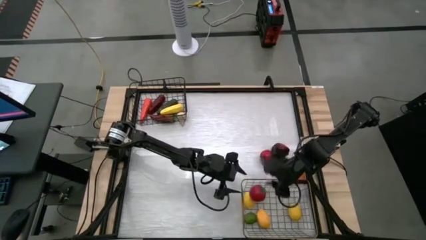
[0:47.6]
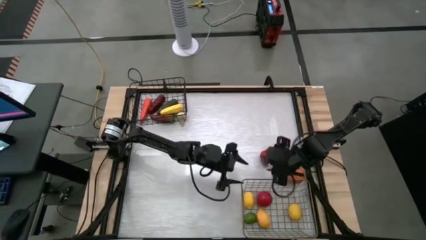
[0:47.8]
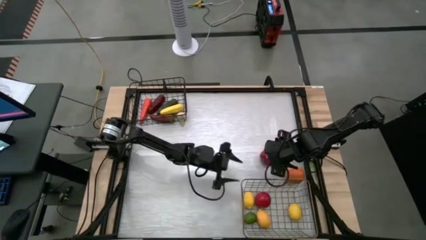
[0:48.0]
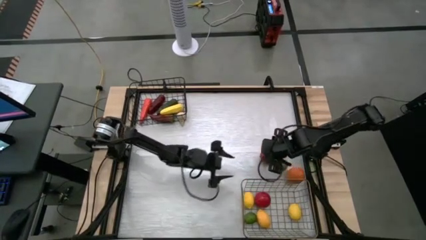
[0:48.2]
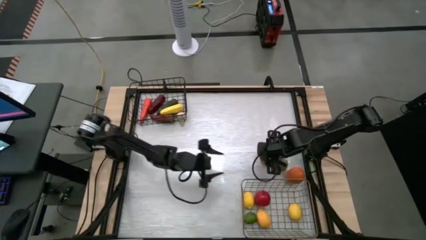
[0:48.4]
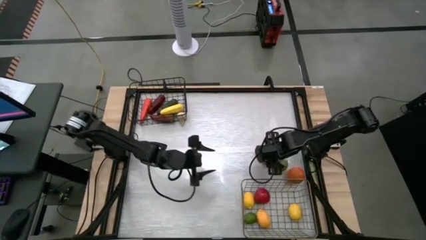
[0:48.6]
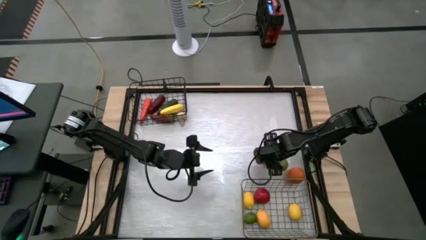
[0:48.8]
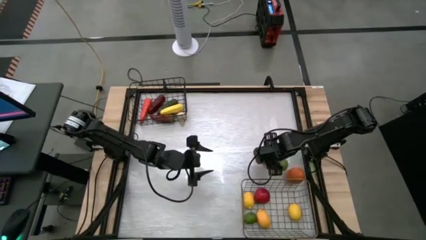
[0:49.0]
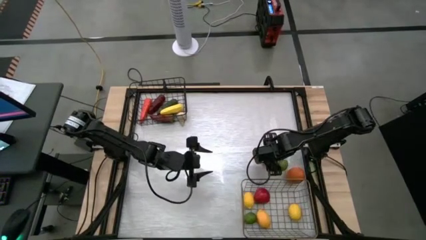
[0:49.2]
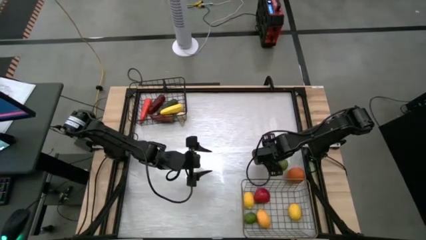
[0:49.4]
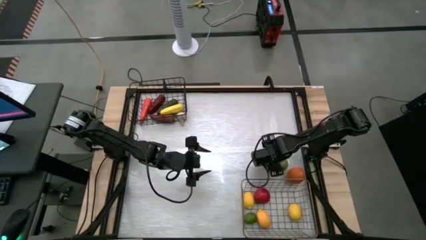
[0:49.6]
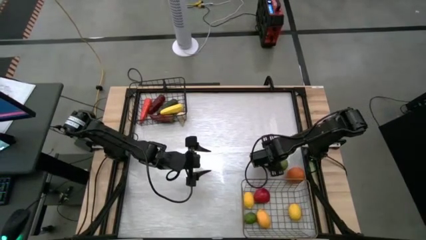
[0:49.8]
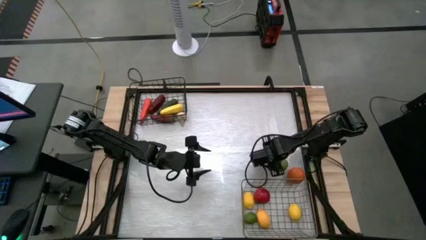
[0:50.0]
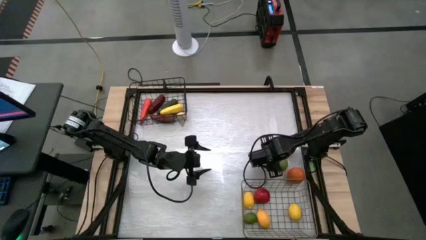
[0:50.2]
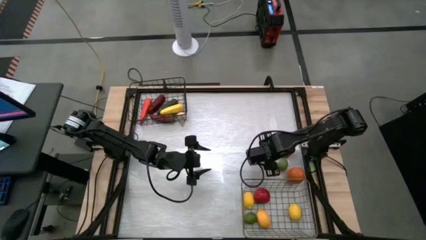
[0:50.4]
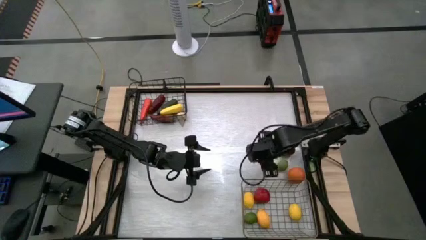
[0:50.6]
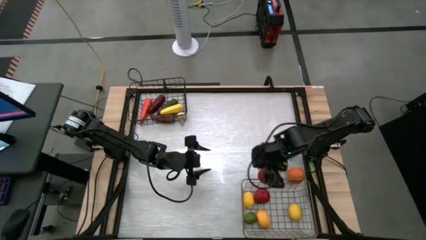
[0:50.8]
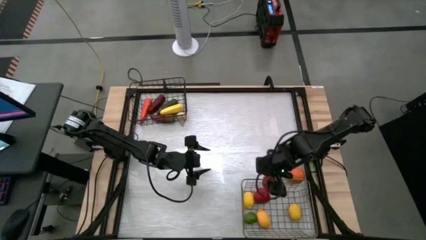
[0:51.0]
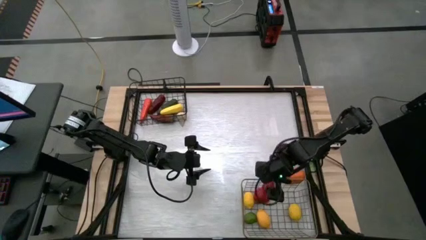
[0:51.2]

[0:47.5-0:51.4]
Task: Sort produce into baskets
Put the tomato into the gold wire basket

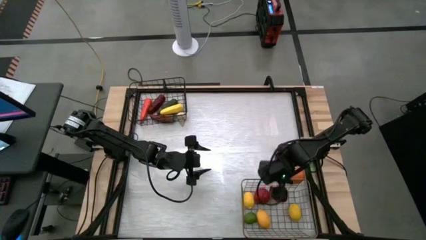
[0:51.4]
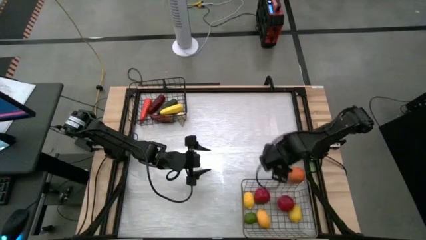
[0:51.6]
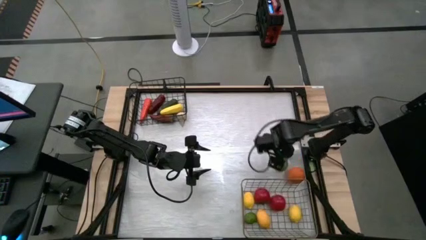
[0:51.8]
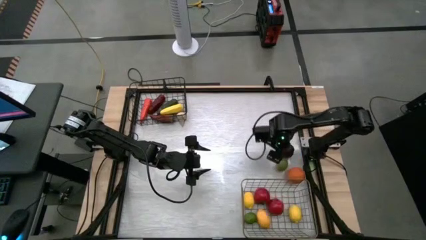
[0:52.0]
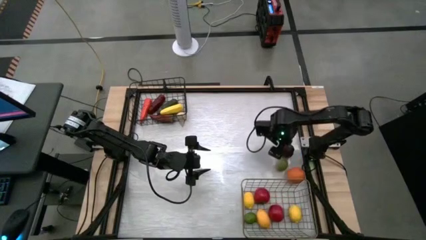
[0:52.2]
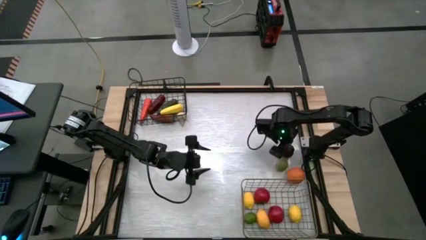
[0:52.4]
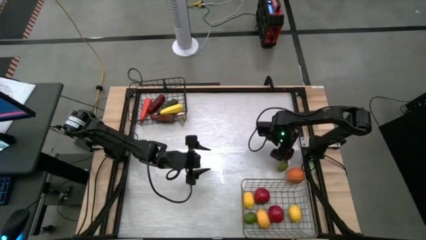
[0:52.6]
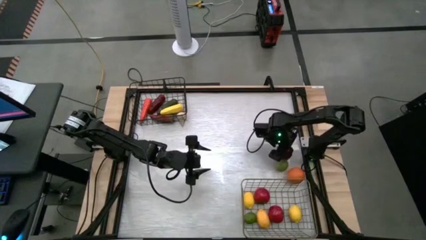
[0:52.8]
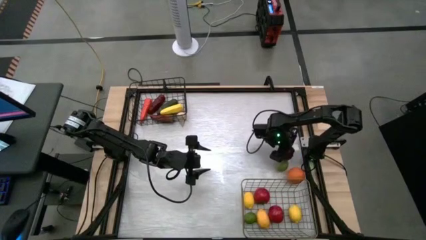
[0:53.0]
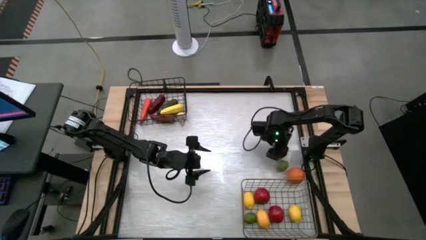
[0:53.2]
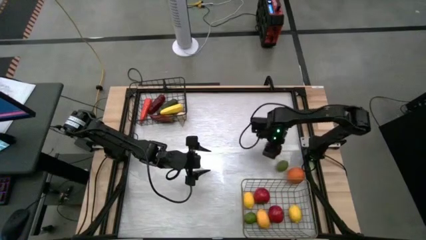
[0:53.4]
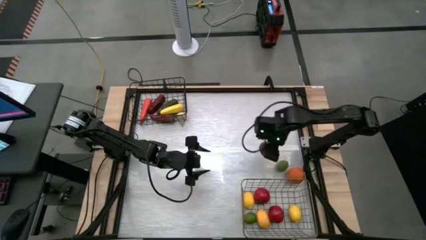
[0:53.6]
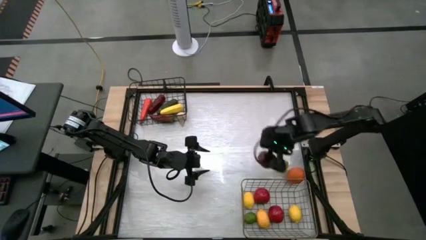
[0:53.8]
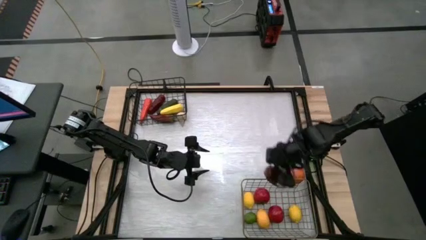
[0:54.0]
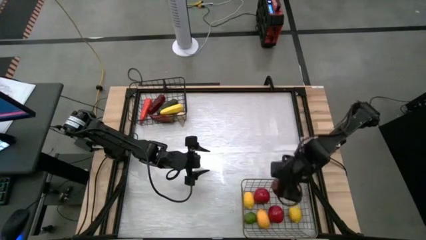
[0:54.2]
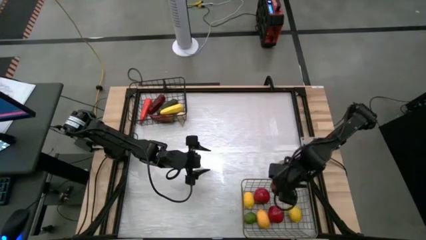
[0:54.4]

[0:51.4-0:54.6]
Put the apple into the gold wire basket

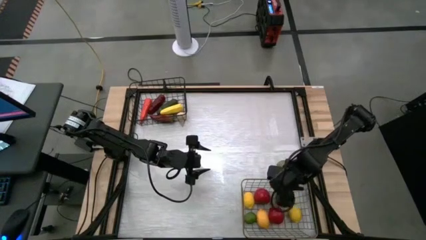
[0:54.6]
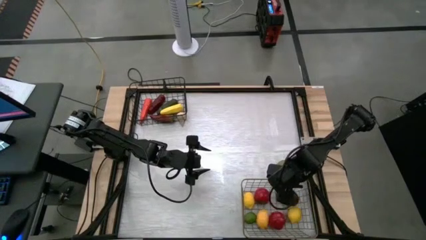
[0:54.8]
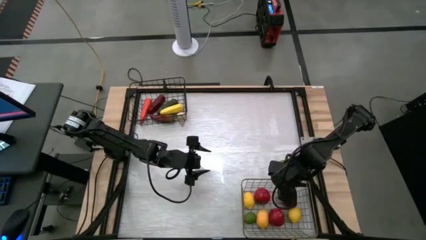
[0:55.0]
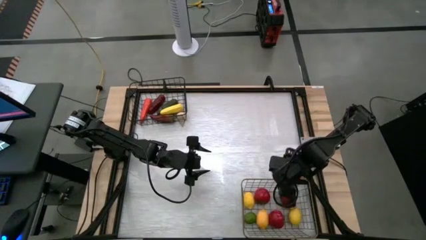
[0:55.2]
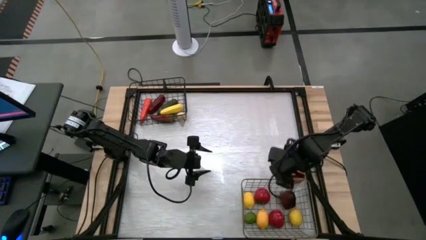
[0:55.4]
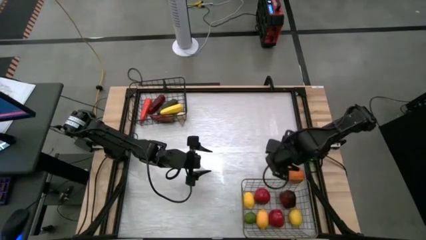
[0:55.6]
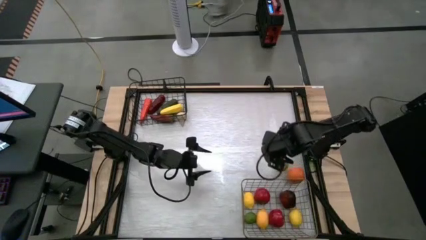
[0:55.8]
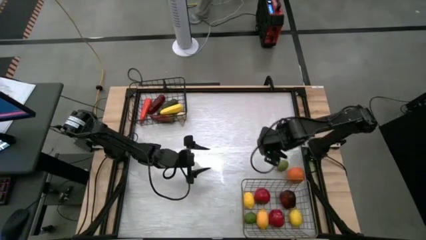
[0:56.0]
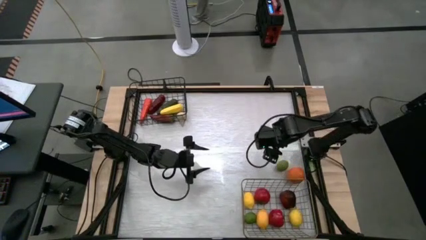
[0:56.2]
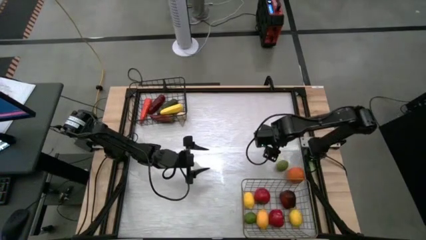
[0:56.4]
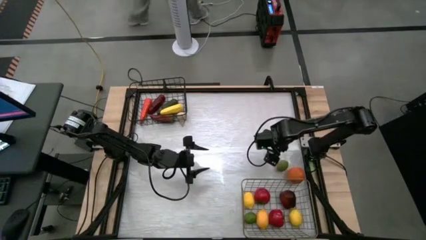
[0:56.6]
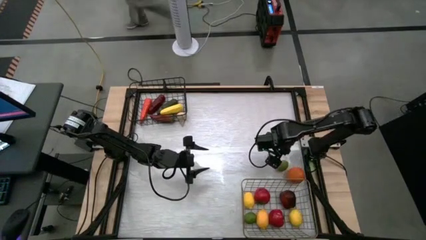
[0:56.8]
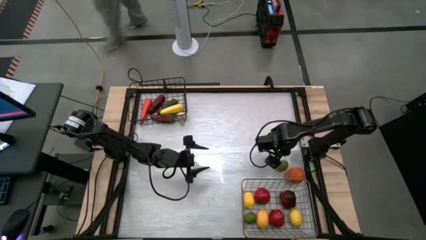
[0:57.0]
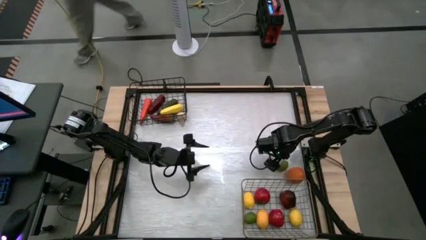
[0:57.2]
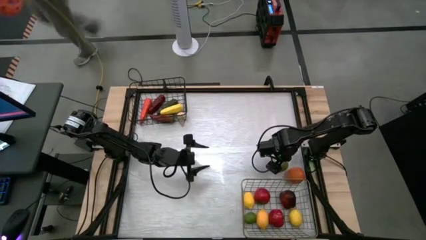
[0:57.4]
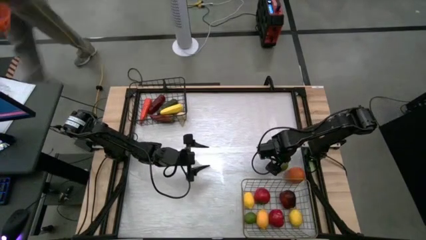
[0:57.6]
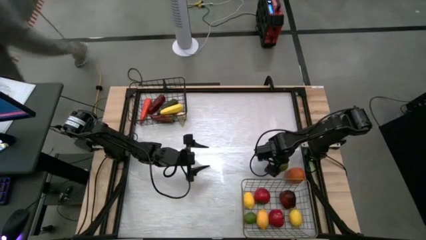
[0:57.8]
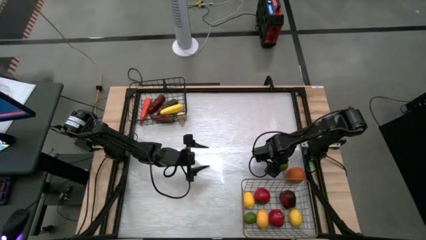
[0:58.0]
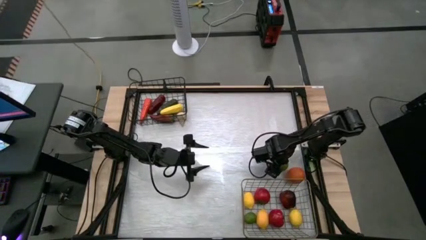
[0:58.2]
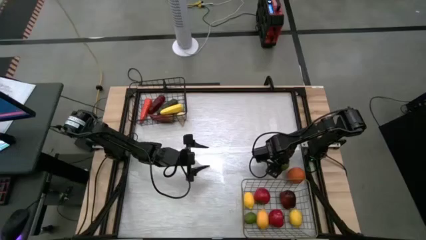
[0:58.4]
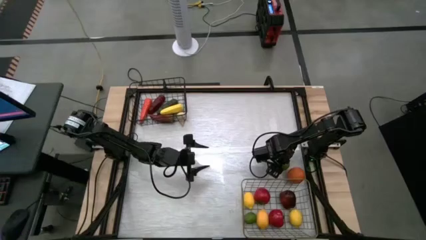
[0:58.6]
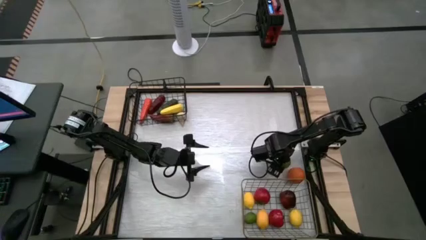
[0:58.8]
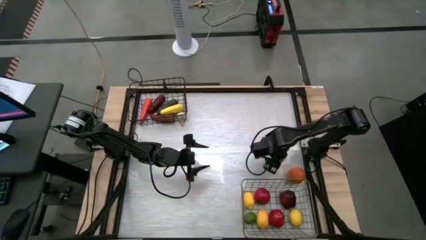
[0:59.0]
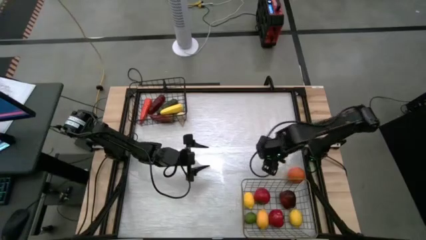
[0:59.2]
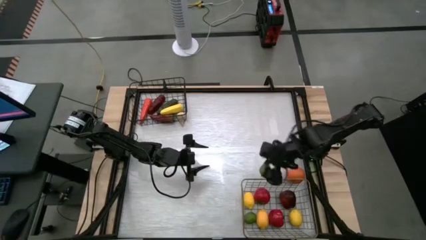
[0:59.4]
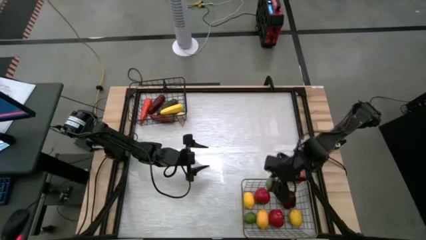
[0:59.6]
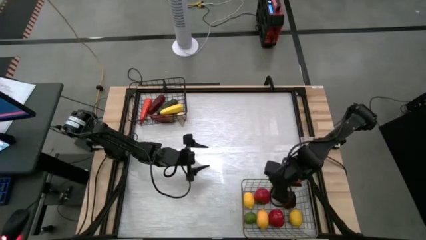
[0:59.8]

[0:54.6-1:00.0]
Put the lime into the gold wire basket

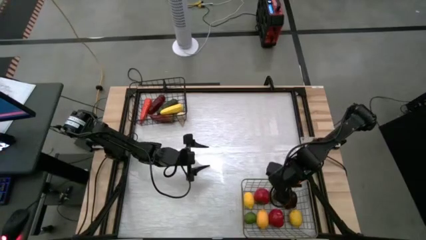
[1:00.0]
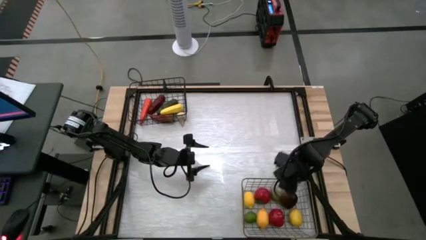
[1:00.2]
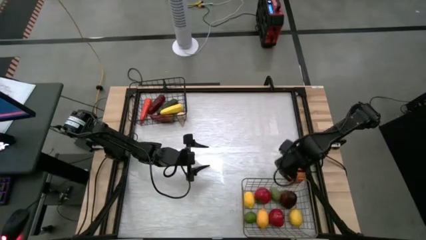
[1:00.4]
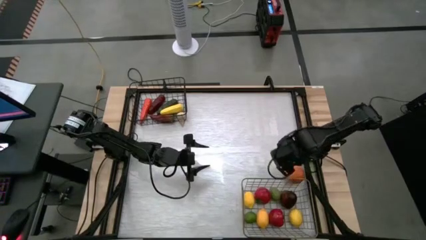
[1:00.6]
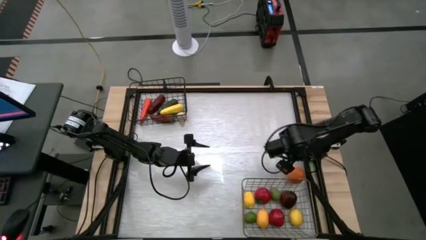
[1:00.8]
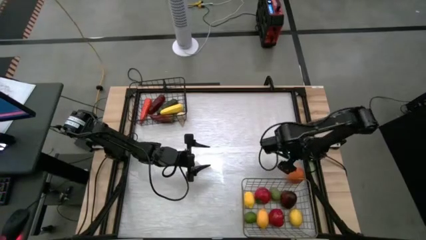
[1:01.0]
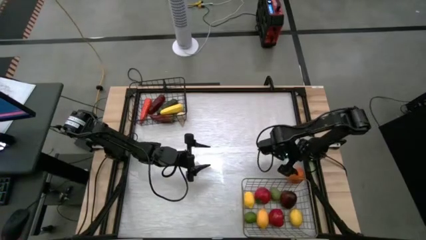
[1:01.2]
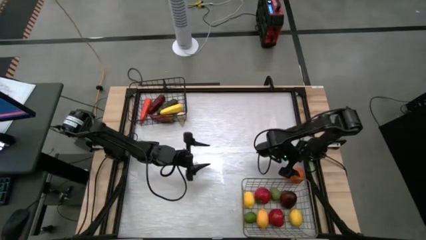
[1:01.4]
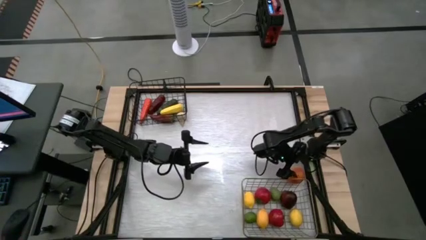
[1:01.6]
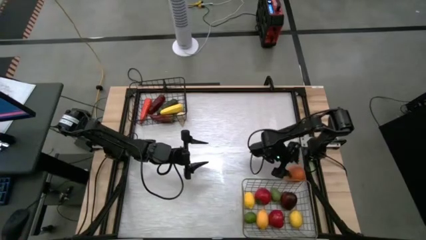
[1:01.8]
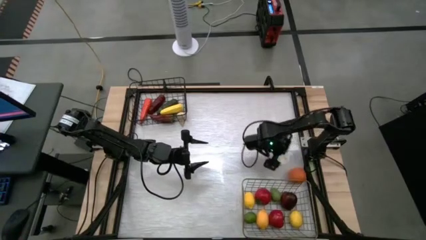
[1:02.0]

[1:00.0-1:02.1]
Put the orange into the gold wire basket

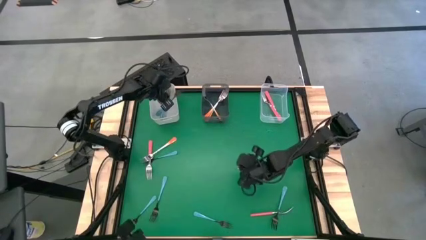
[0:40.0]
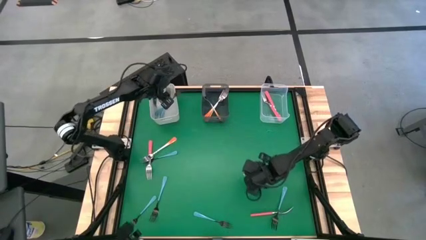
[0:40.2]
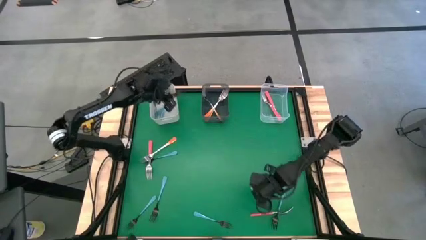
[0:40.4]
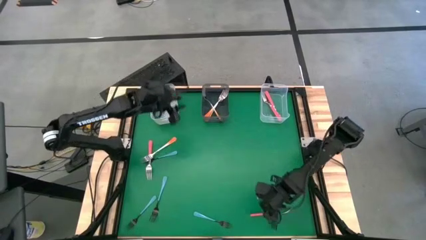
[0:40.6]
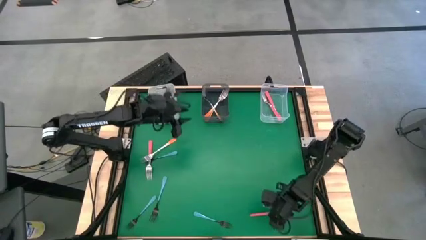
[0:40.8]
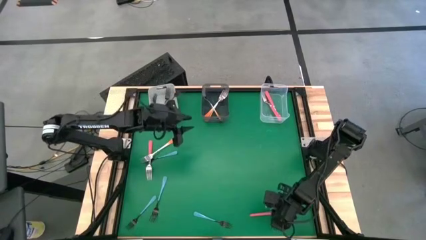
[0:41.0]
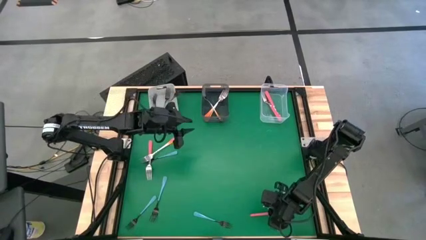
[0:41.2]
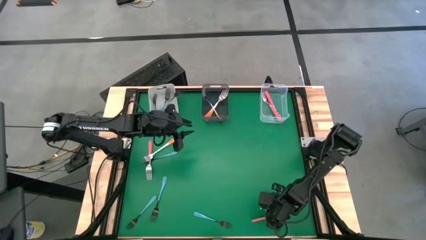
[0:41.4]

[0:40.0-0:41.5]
Task: Sort silverware by color (type)
Put the pink fork into the transparent bin
